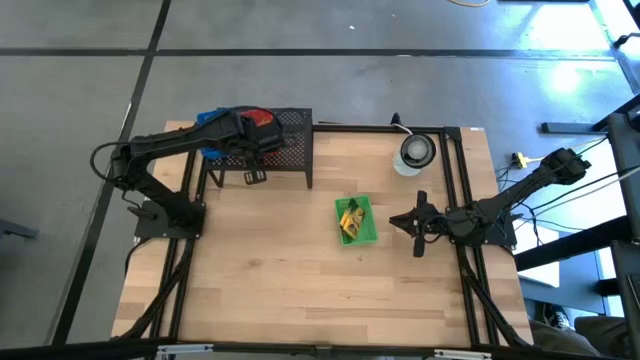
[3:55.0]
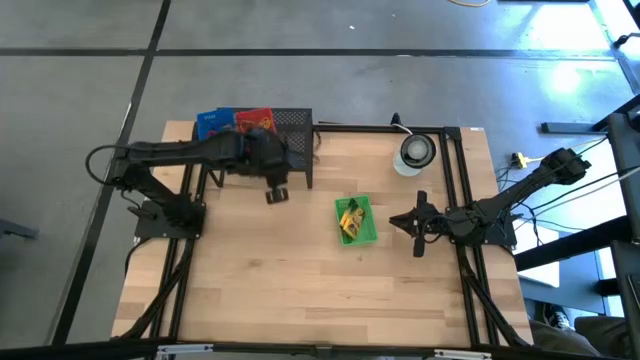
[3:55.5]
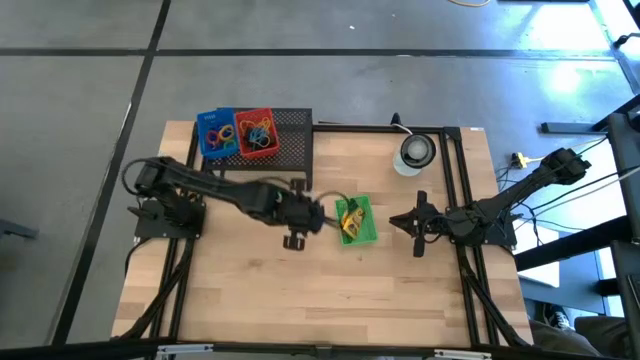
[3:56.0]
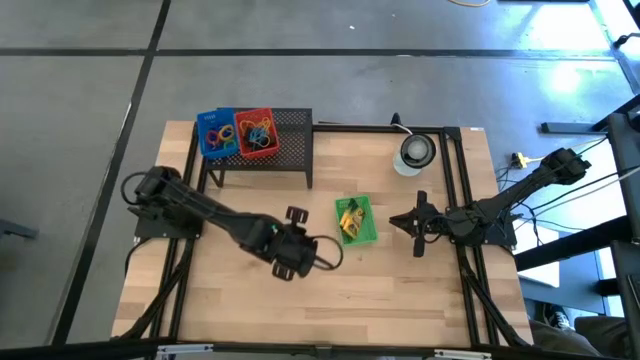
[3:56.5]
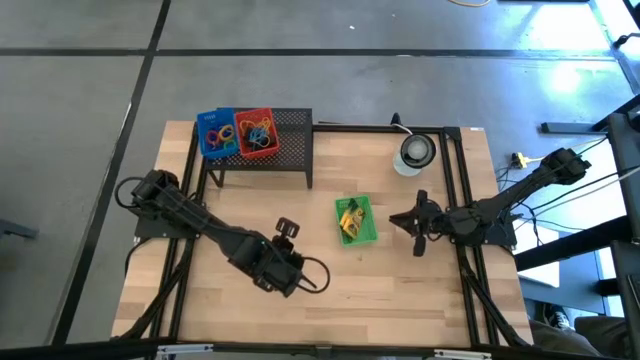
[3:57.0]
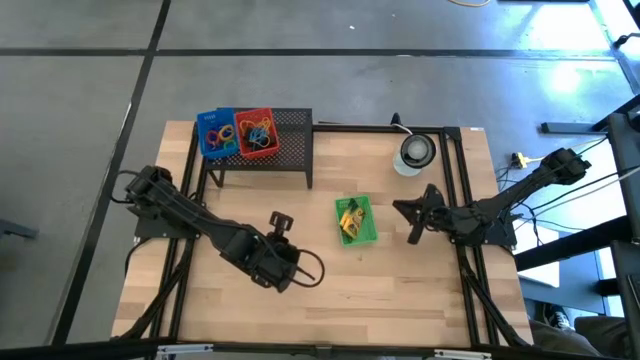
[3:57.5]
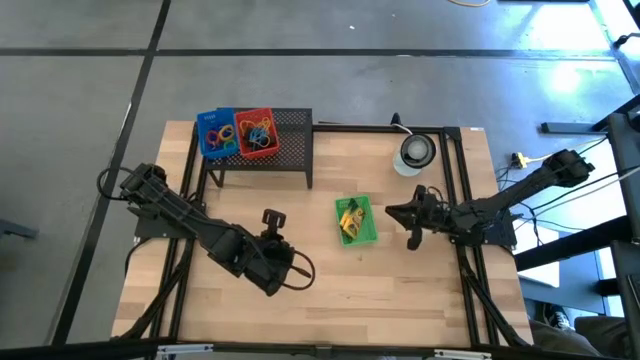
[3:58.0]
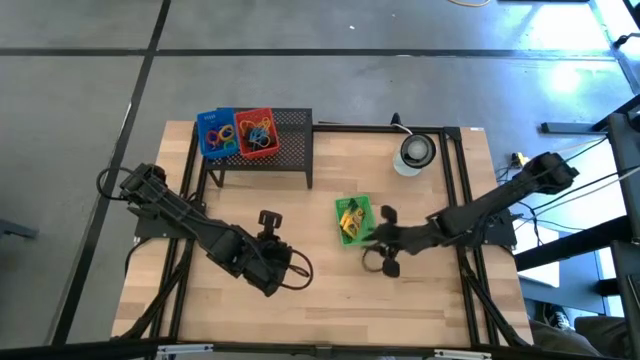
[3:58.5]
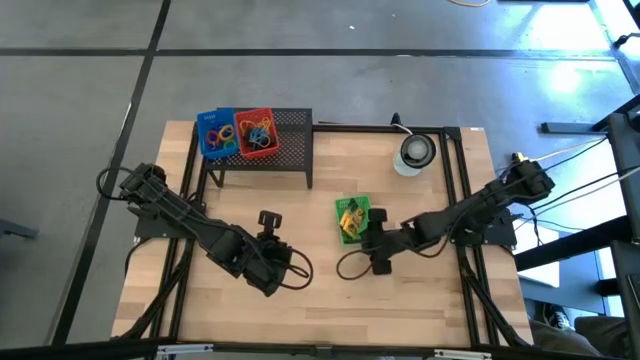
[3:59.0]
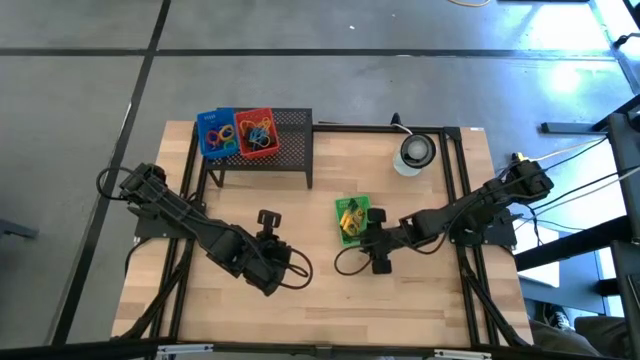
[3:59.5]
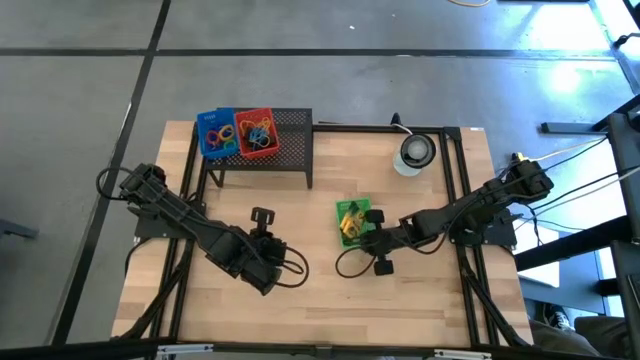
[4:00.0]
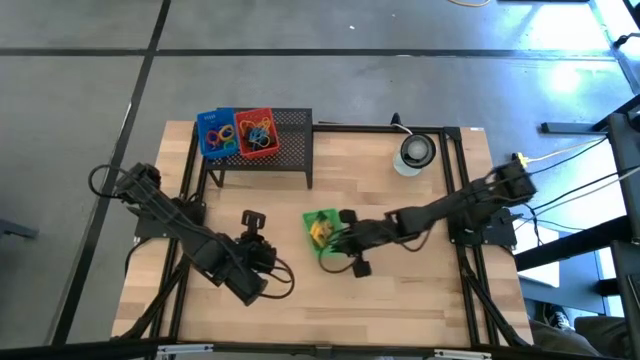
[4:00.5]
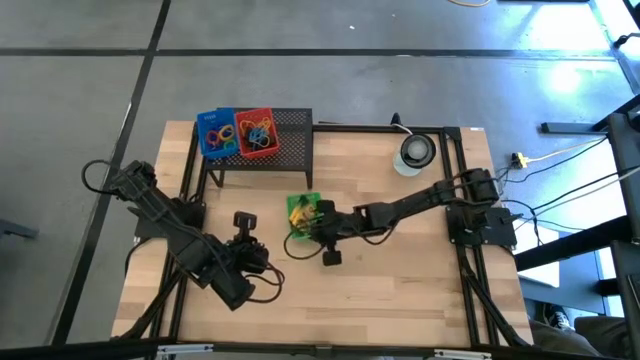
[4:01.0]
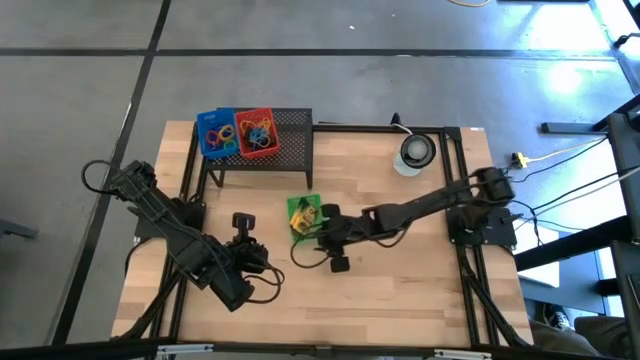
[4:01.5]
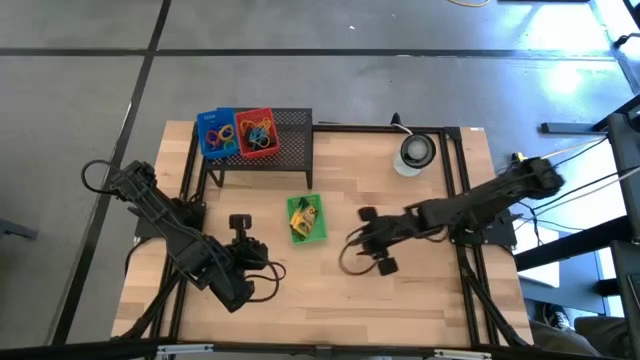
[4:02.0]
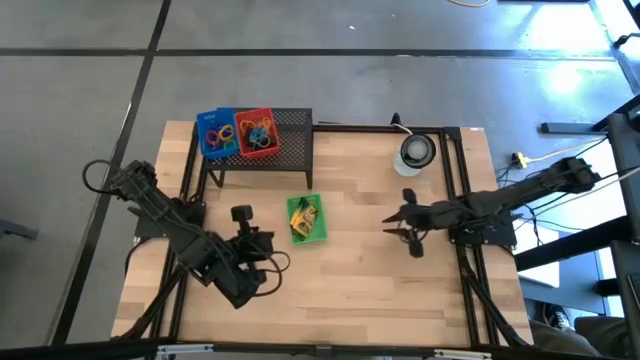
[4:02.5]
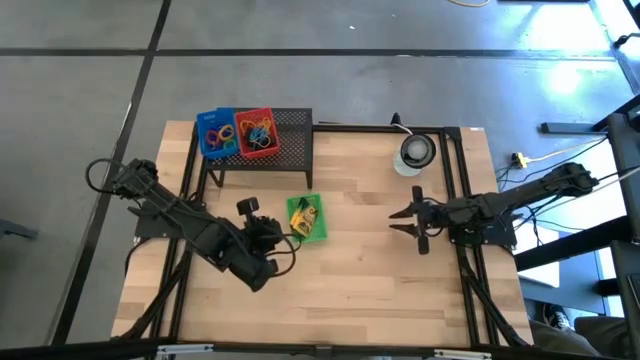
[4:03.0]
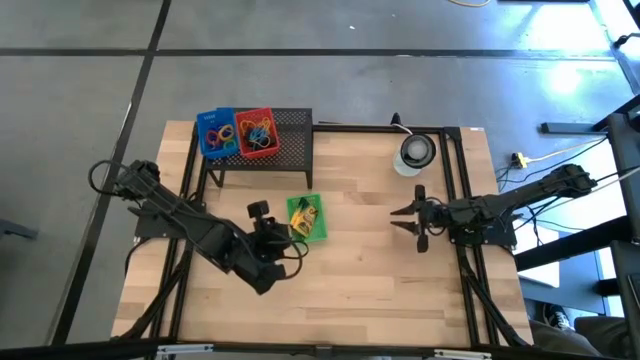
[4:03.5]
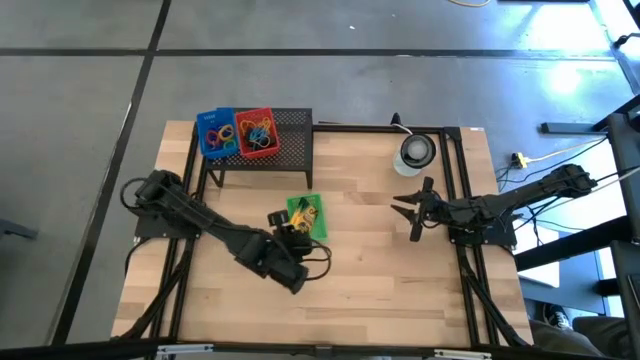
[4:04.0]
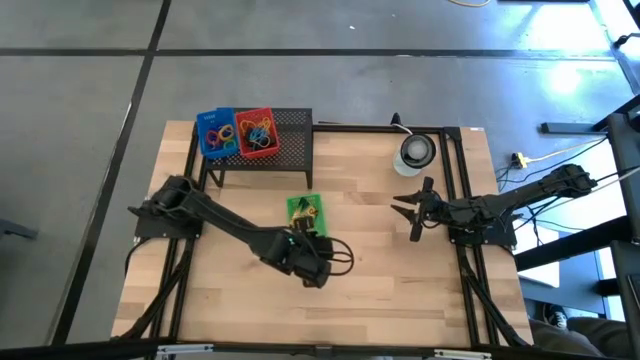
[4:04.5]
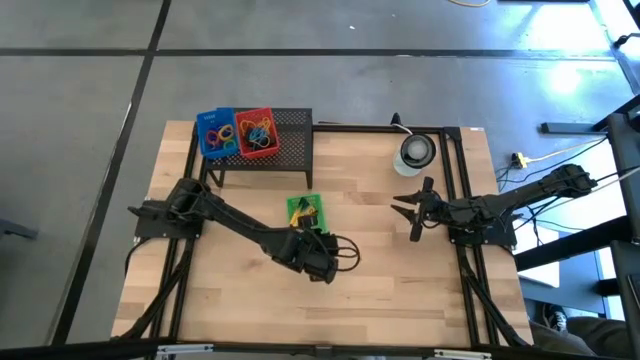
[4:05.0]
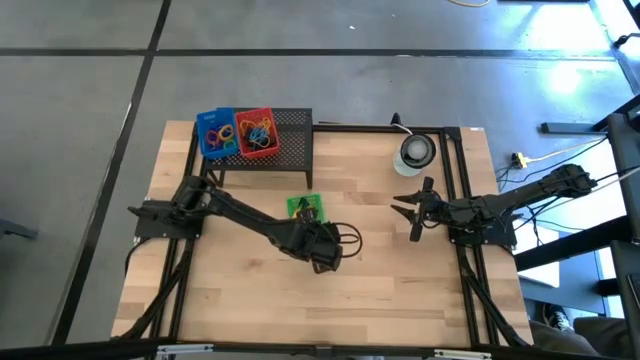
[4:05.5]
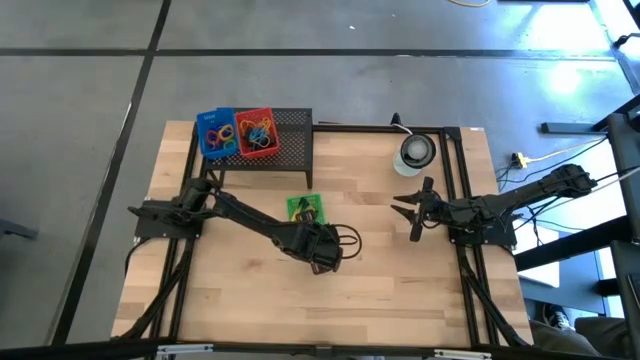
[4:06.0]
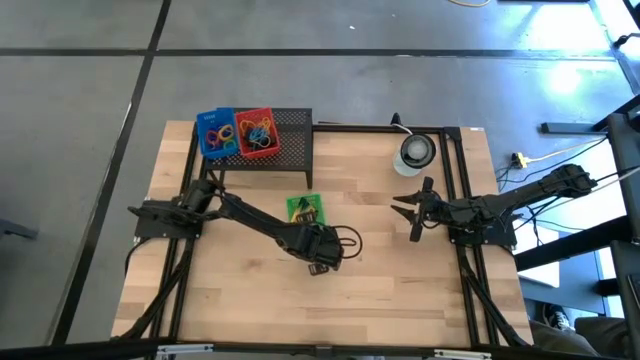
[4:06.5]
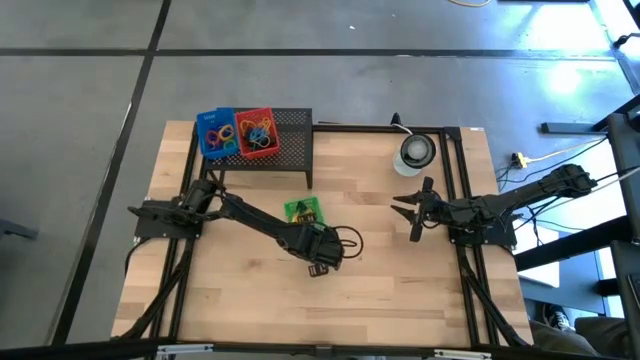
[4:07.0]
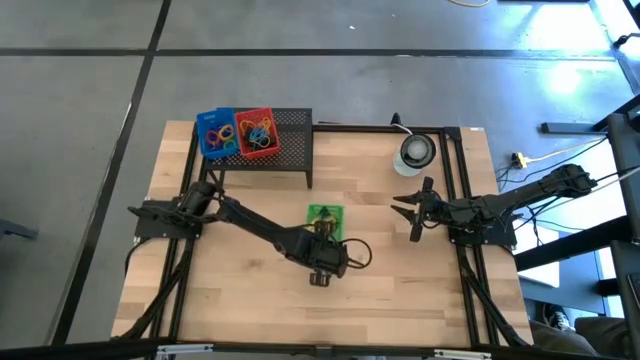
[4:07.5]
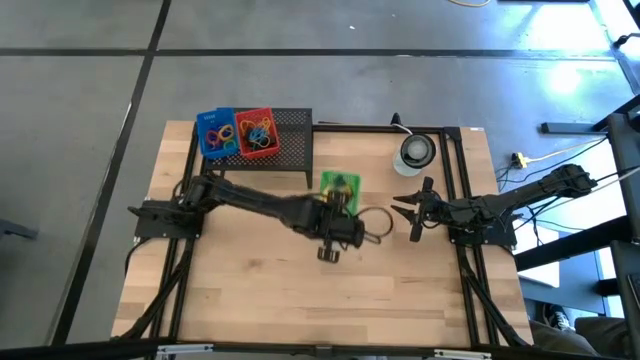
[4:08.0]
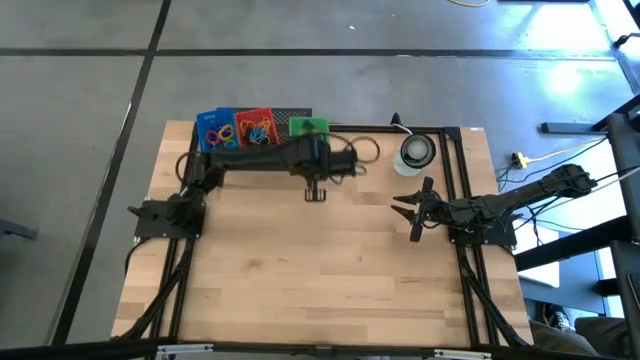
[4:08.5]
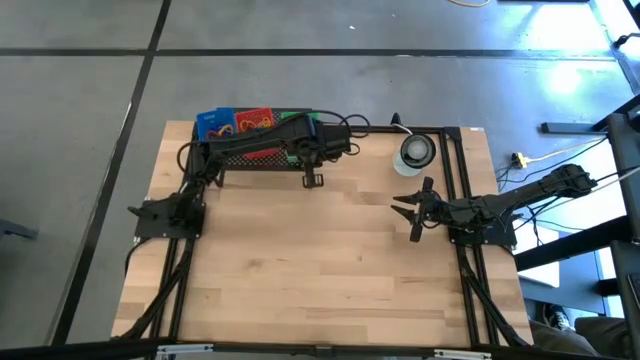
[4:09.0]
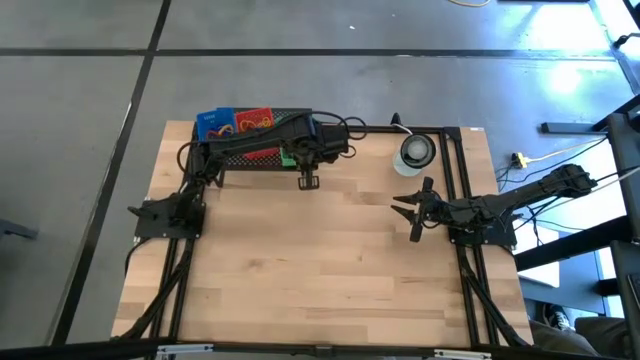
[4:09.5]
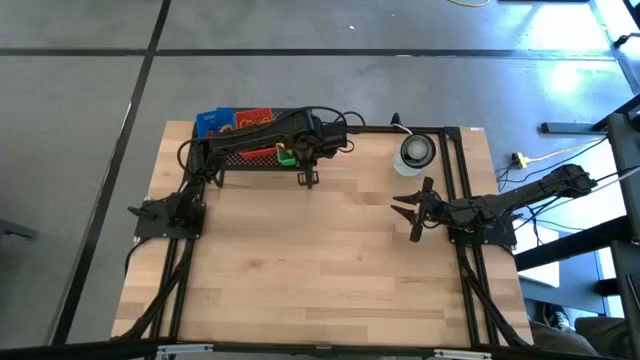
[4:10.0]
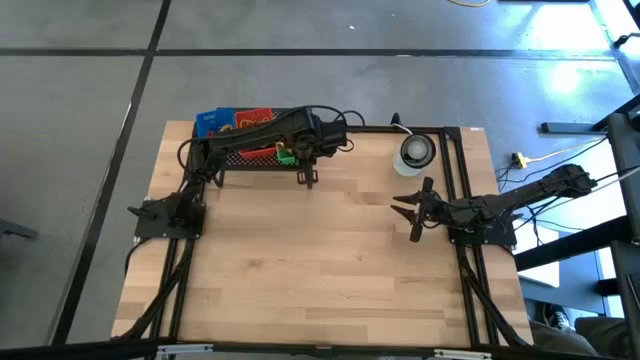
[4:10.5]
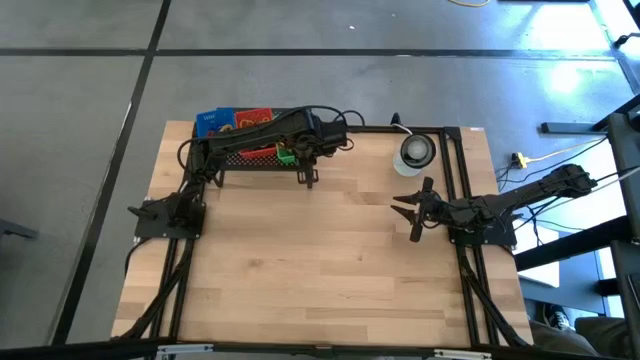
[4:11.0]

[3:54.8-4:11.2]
Task: Pick & Place Office Desk Supplies
Put the green bin with crayon boxes on the shelf

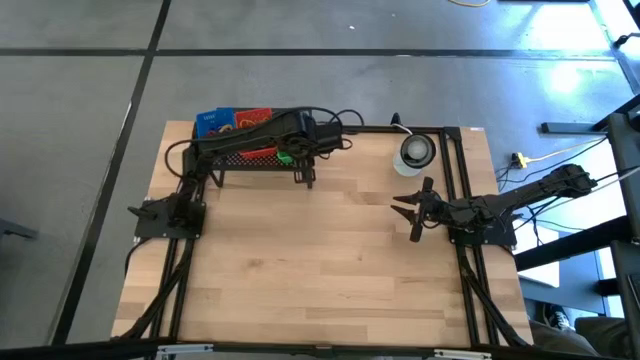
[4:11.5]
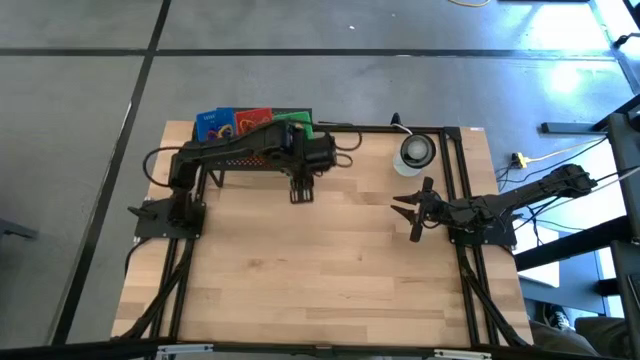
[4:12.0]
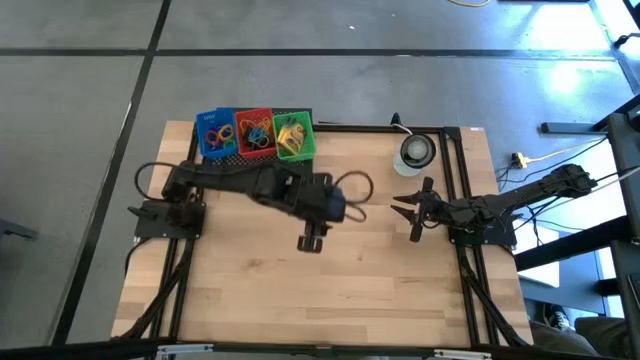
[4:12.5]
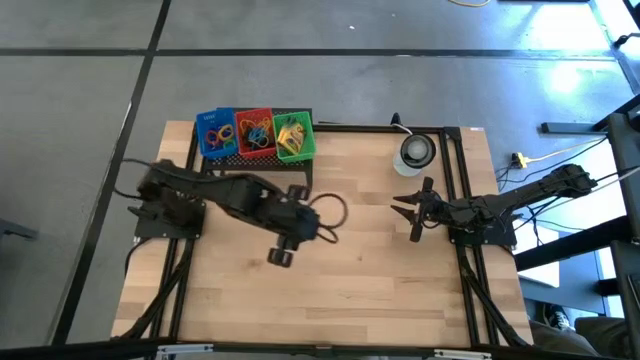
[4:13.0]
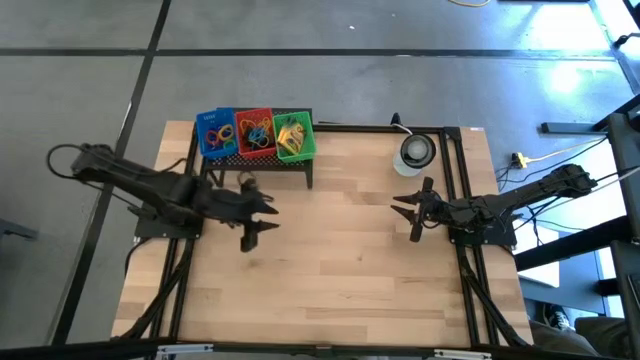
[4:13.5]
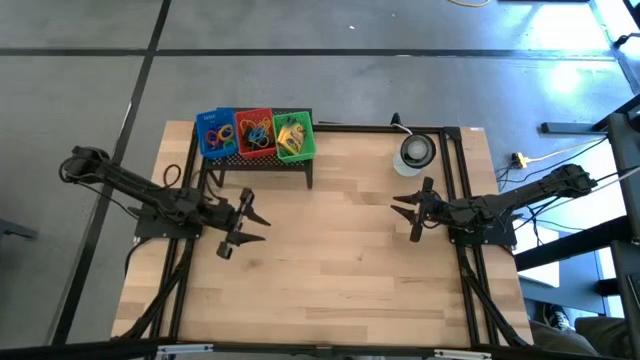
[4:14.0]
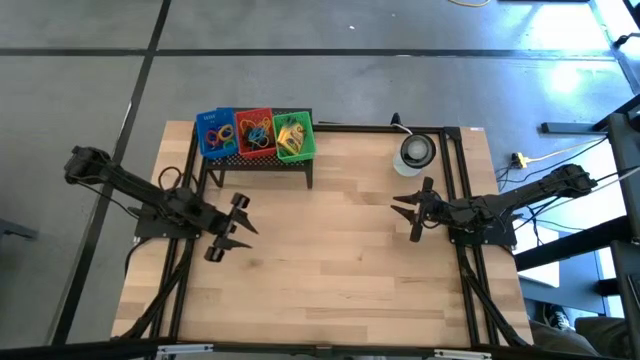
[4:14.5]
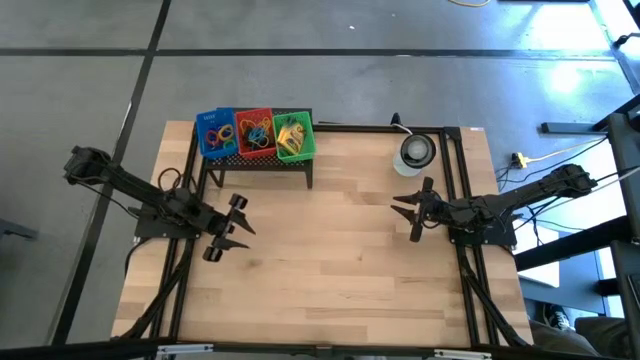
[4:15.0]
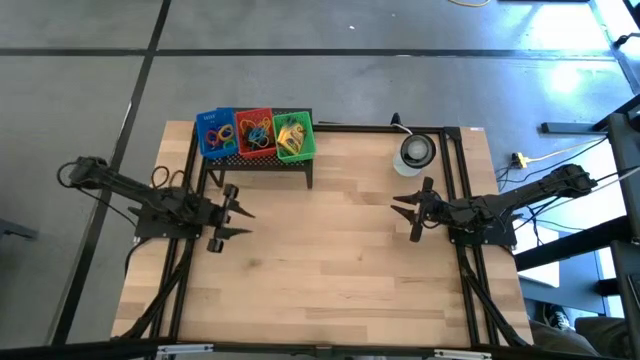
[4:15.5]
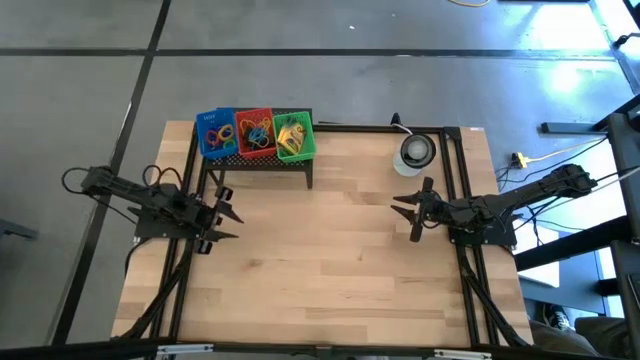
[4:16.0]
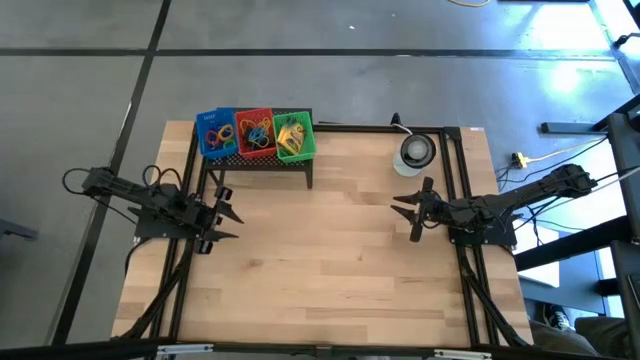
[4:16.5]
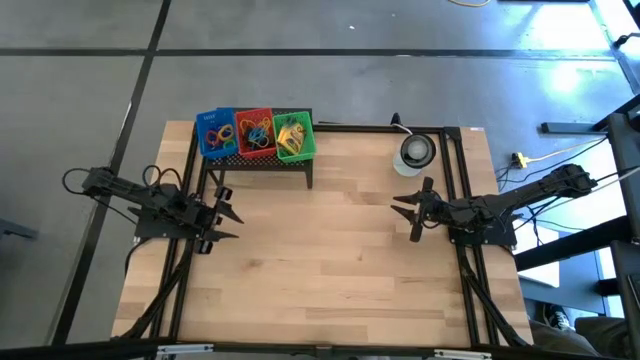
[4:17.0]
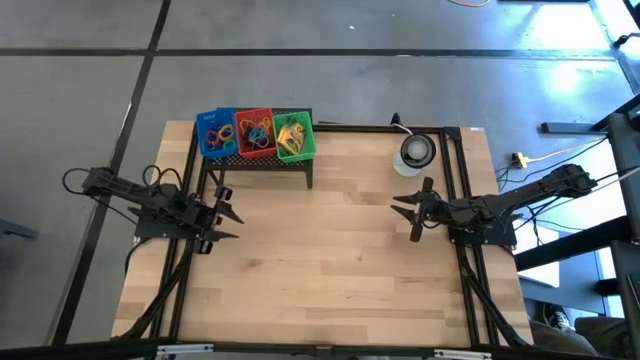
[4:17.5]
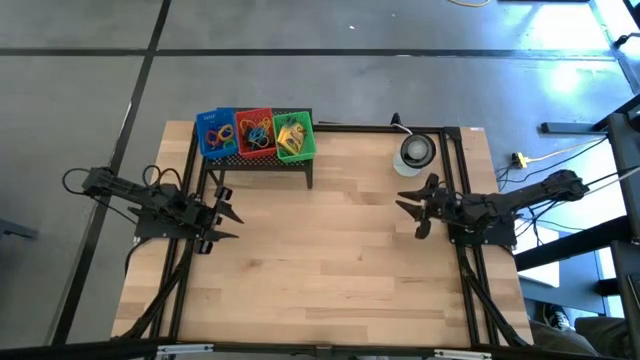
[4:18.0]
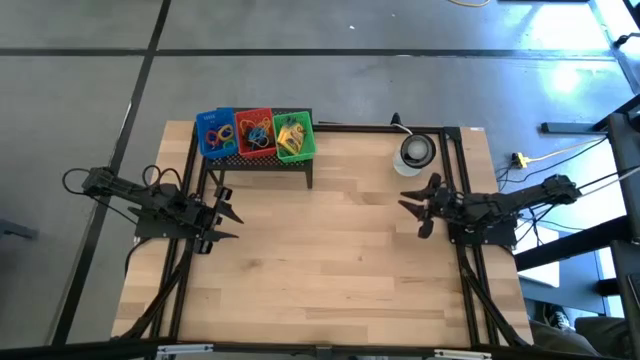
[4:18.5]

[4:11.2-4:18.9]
Return to Home Position
